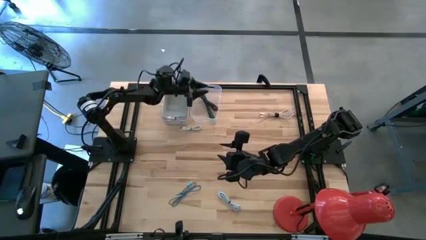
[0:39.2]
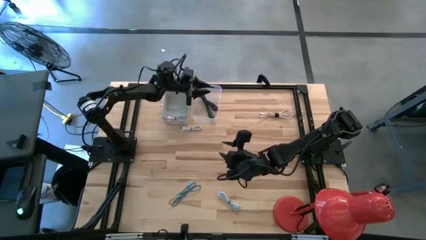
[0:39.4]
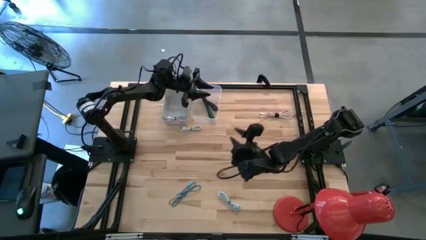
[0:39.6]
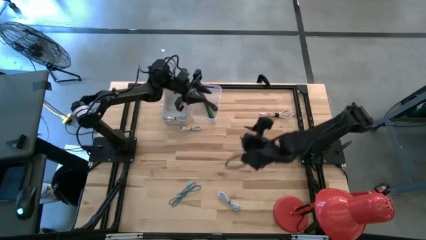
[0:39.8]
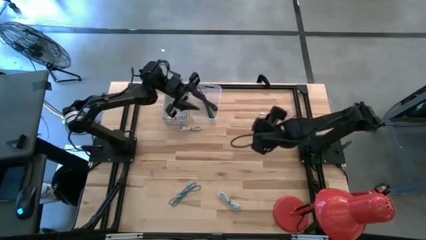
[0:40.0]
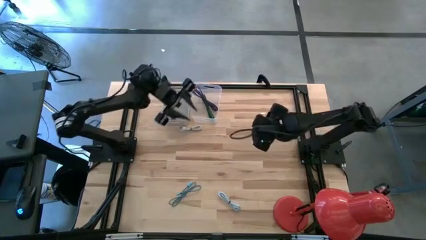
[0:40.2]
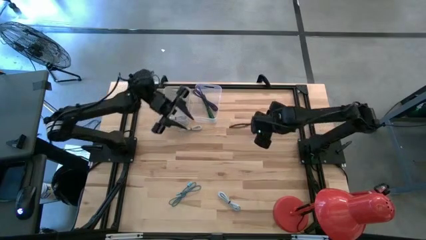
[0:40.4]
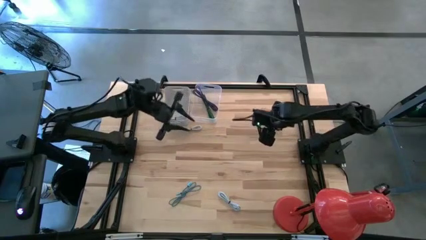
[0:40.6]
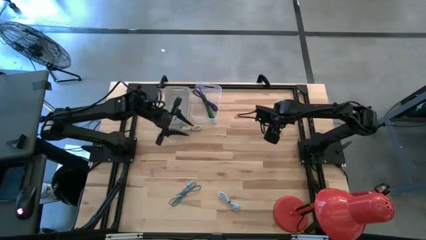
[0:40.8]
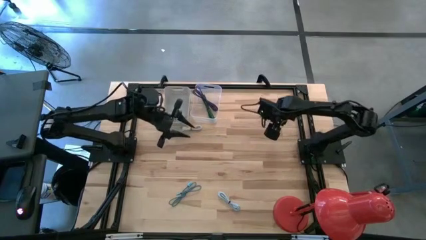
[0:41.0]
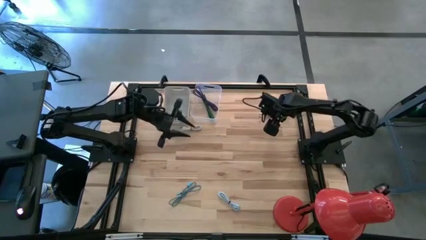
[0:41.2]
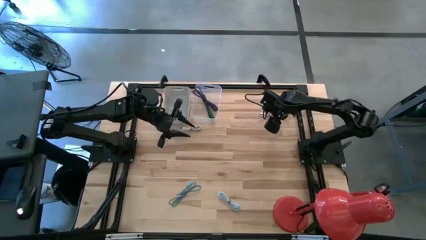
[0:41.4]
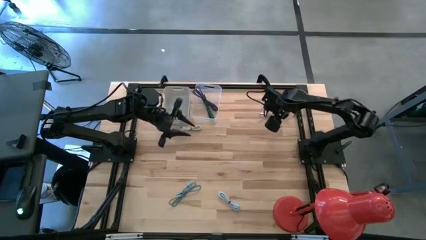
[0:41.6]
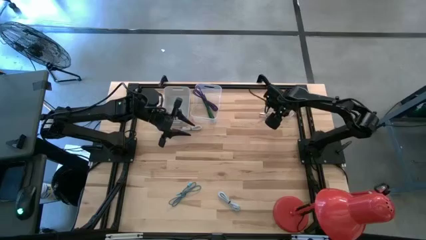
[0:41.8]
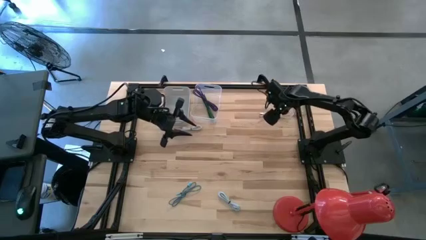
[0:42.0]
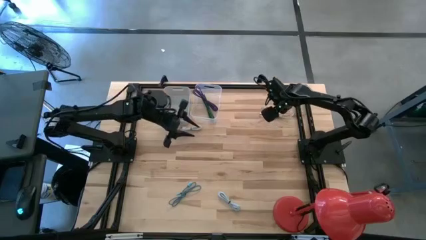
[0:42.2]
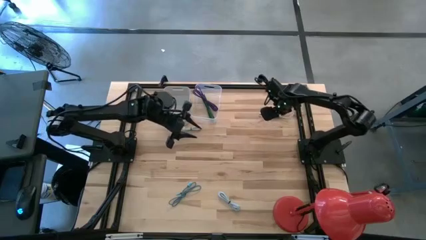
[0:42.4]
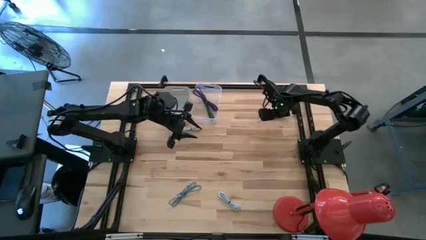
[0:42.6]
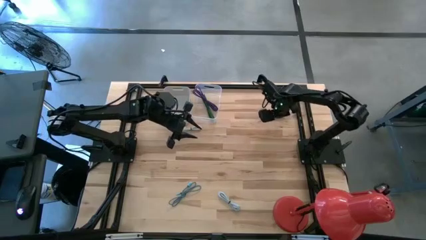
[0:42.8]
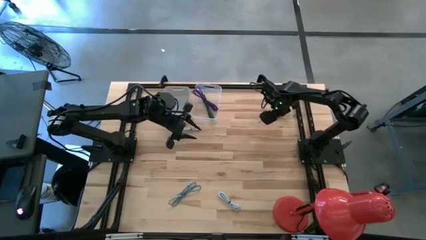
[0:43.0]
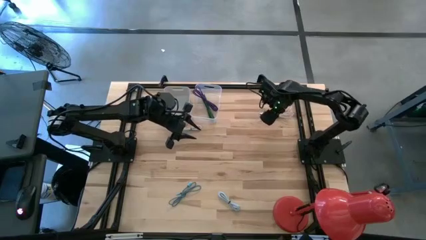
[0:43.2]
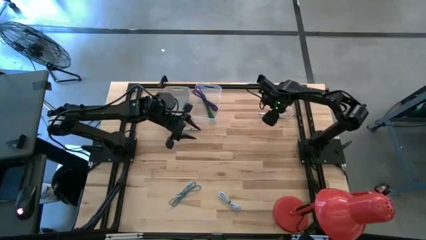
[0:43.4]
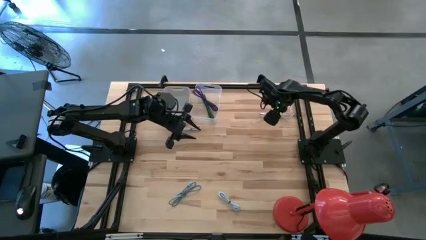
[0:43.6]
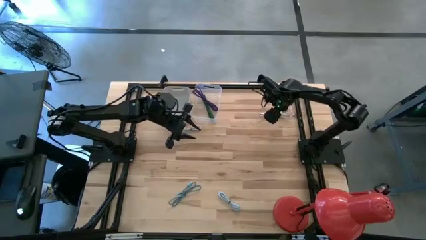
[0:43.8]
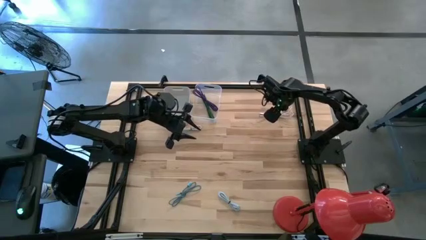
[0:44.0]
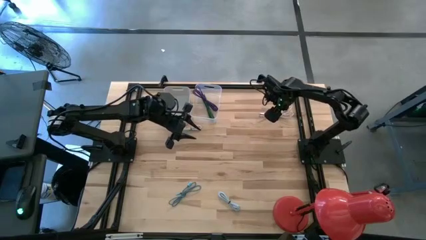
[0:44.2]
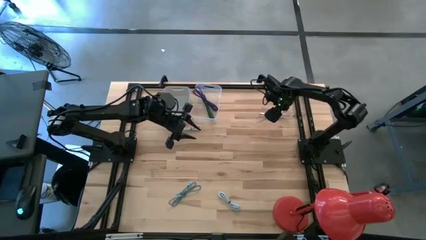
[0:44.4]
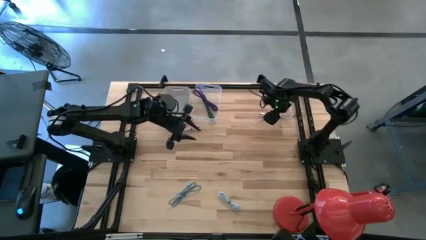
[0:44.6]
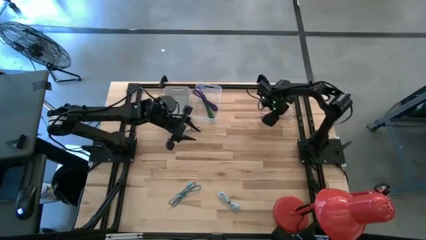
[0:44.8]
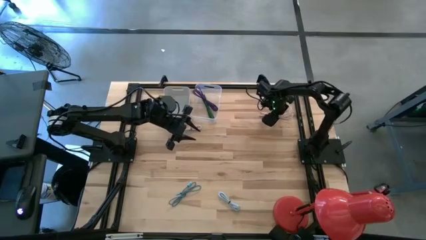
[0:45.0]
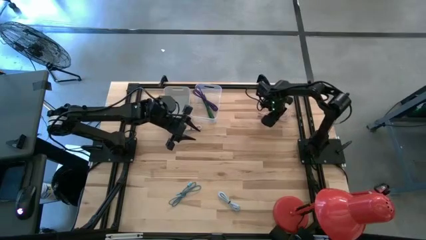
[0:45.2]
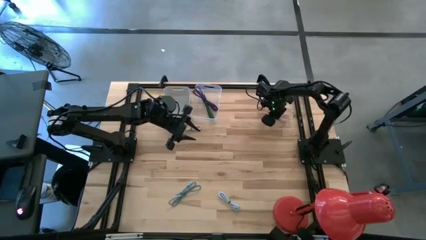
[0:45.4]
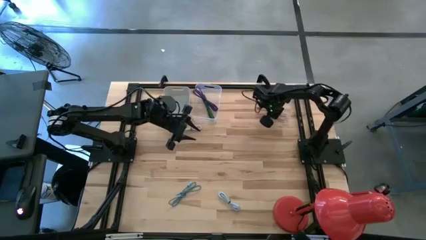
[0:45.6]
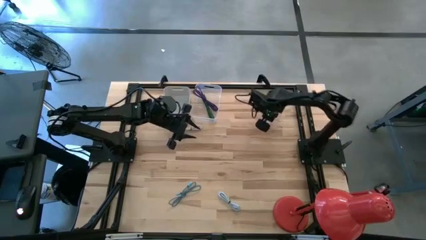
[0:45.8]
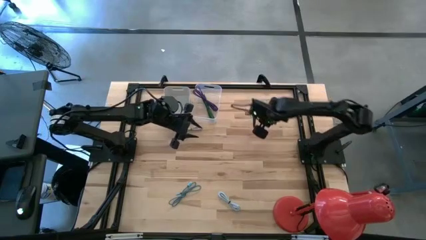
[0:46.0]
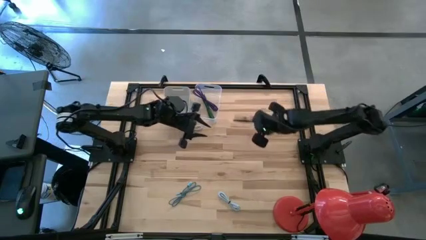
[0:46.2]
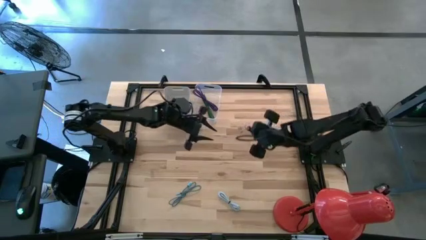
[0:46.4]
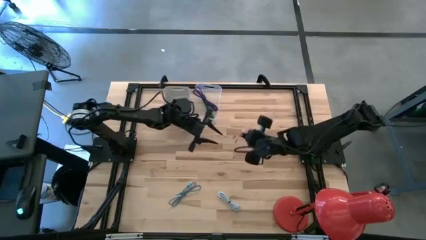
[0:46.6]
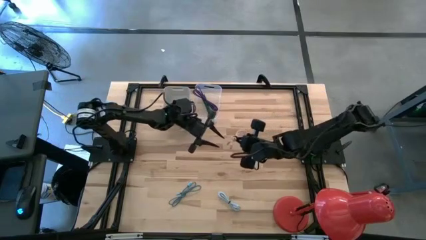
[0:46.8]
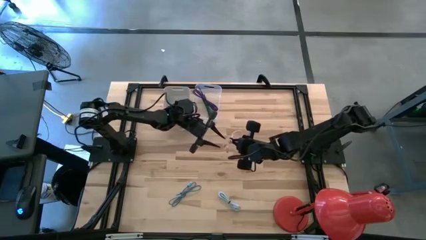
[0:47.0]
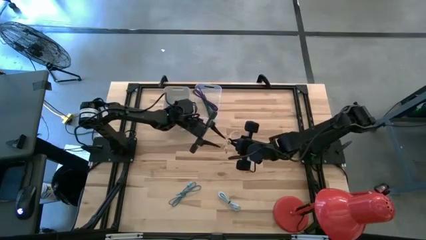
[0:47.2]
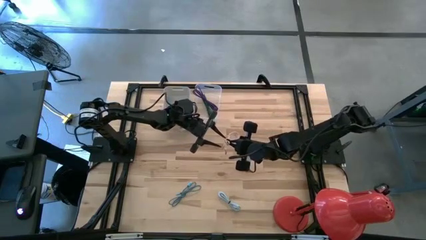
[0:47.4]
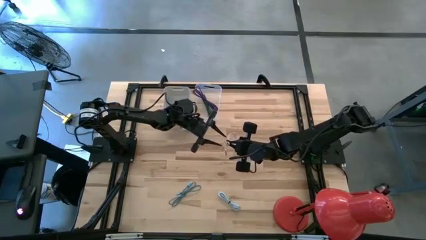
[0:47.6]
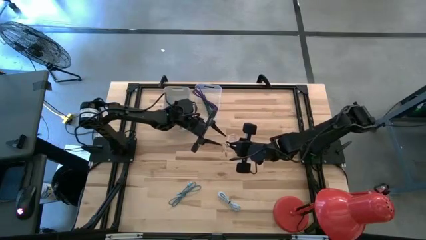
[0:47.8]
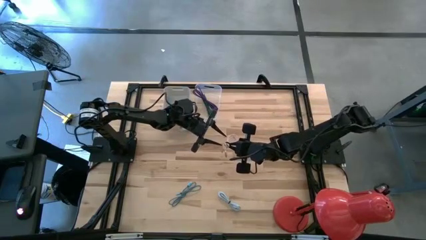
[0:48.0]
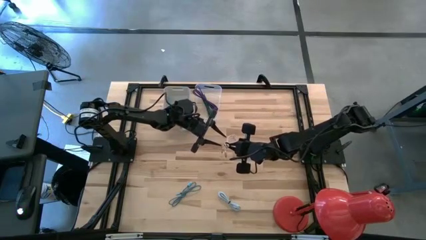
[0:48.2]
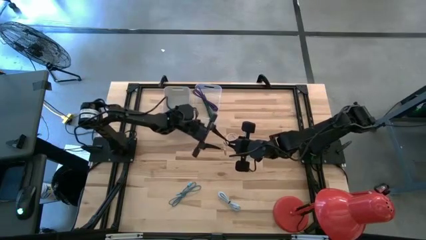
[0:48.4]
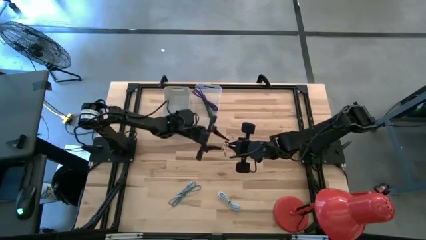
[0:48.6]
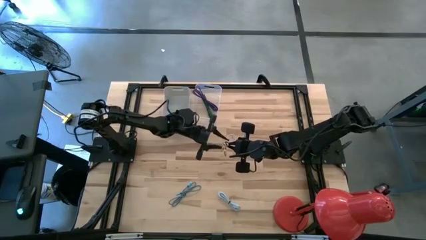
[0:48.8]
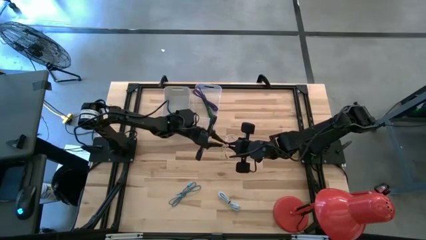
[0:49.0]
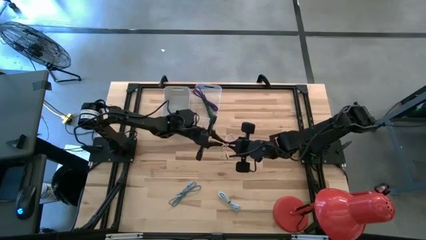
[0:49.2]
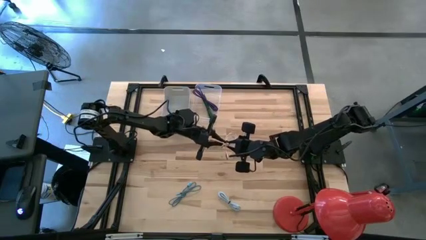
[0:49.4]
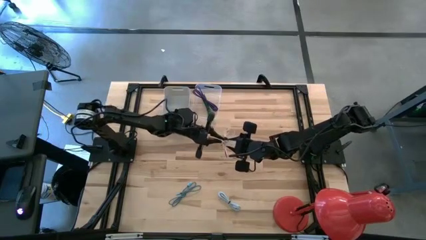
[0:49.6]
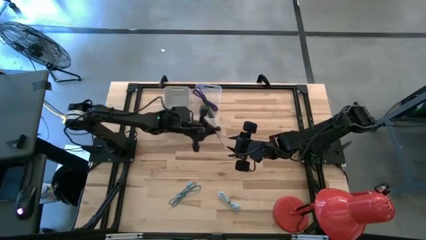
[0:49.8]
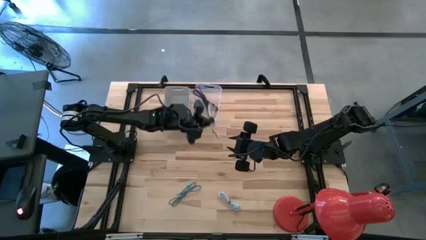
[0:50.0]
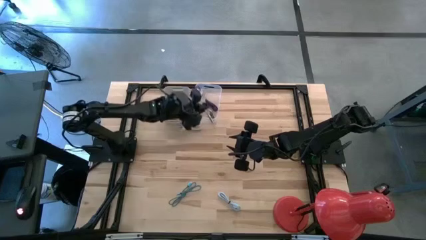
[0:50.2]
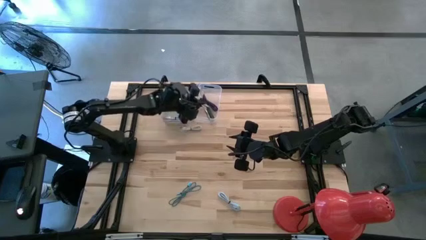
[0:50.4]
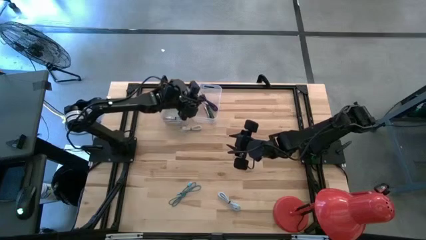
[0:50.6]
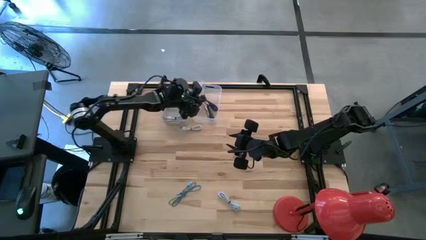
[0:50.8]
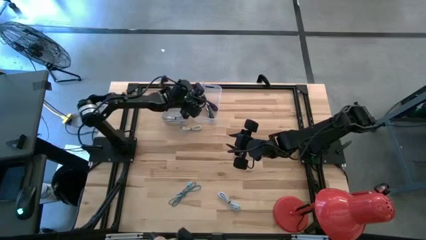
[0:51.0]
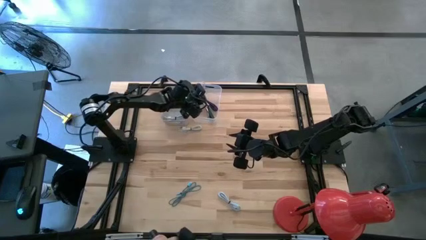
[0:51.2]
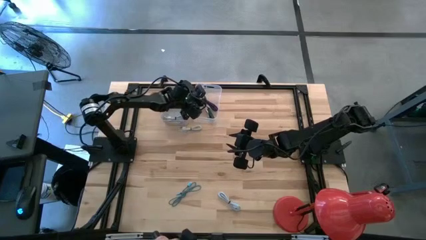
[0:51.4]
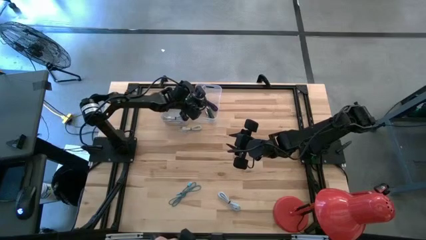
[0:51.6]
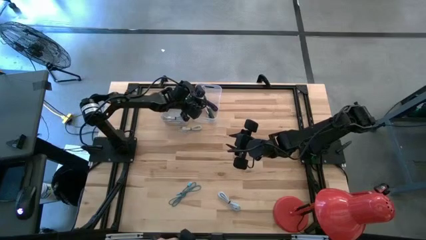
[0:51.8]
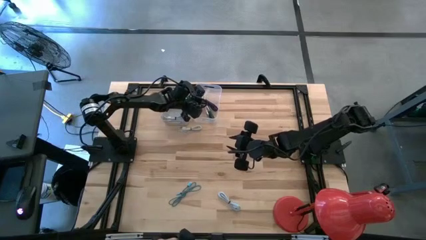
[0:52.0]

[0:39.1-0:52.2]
Task: Pick & Place USB Port
Put the striped pink charger cable into the transparent bin

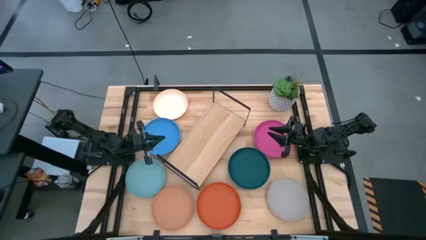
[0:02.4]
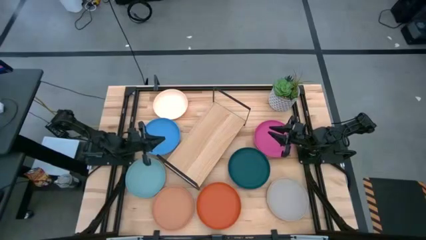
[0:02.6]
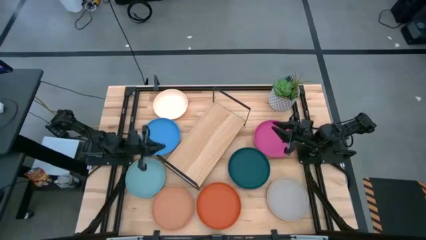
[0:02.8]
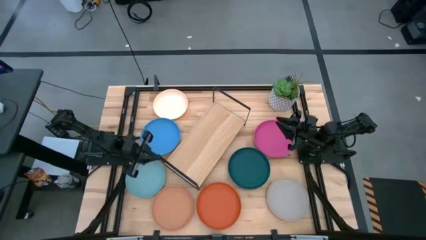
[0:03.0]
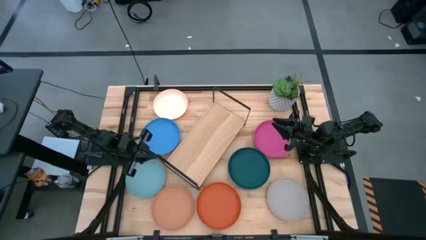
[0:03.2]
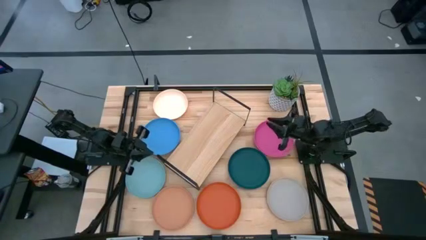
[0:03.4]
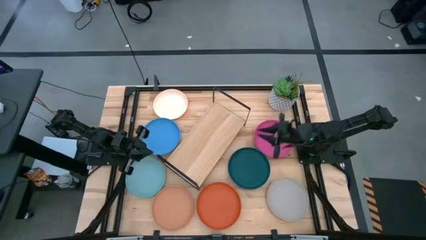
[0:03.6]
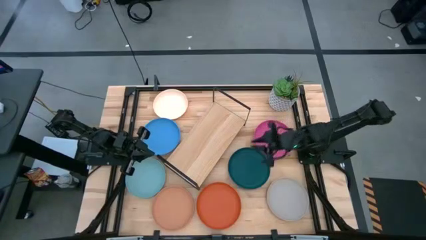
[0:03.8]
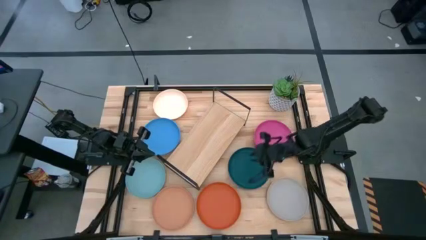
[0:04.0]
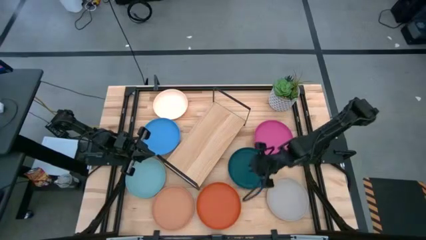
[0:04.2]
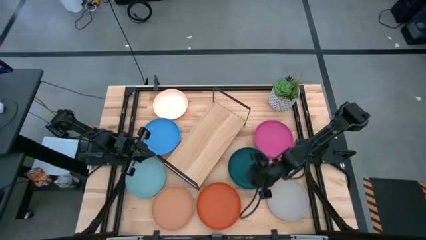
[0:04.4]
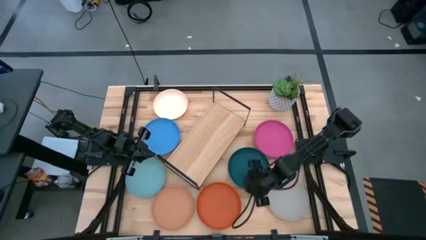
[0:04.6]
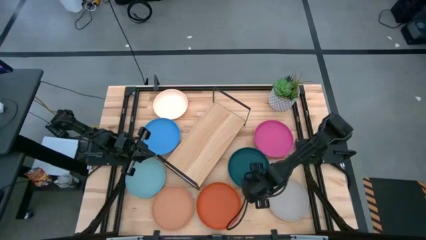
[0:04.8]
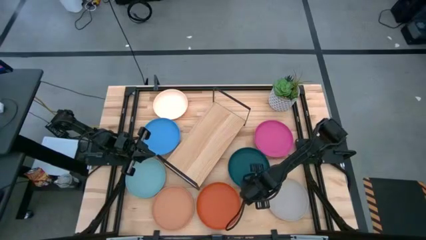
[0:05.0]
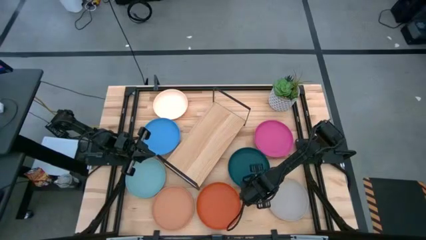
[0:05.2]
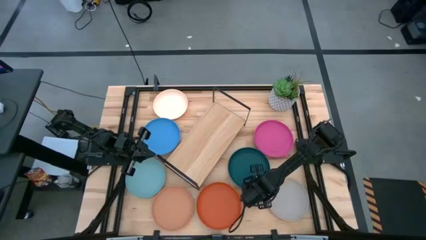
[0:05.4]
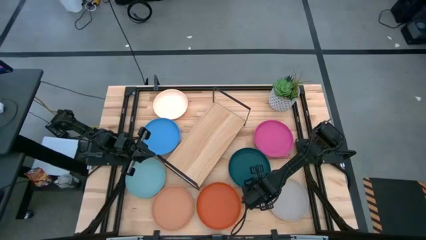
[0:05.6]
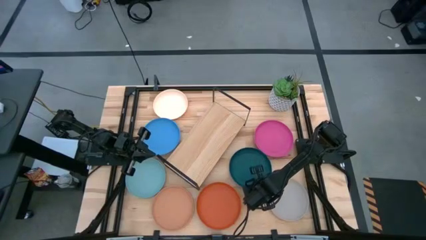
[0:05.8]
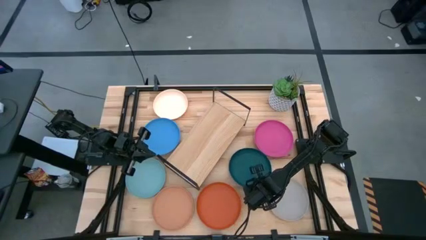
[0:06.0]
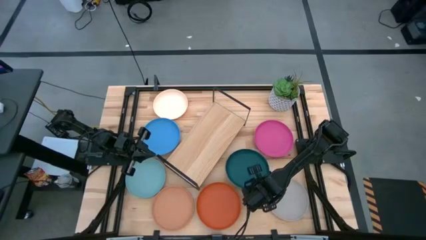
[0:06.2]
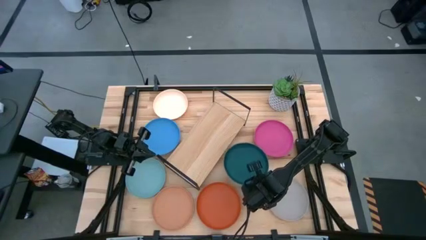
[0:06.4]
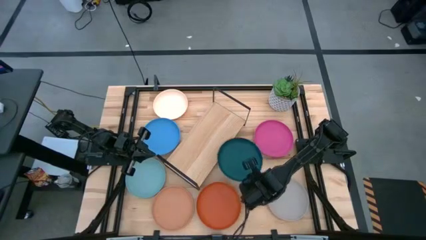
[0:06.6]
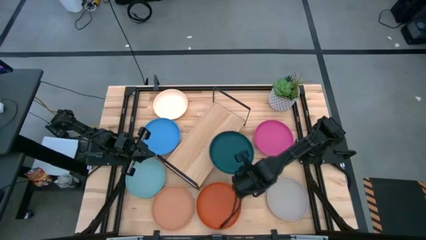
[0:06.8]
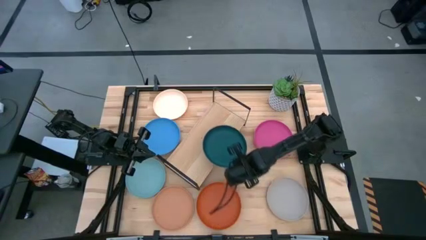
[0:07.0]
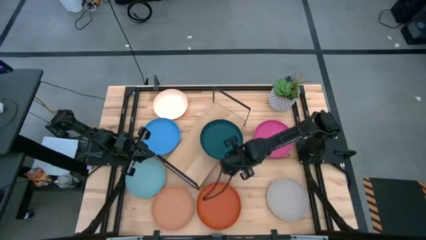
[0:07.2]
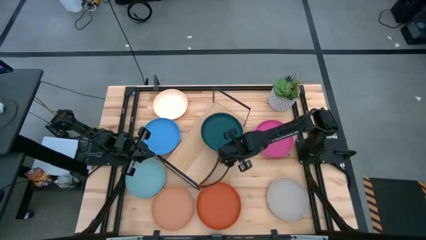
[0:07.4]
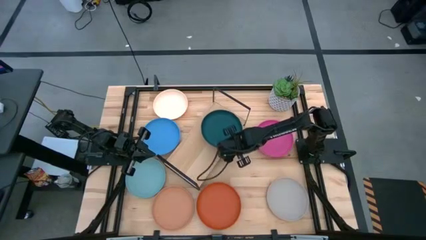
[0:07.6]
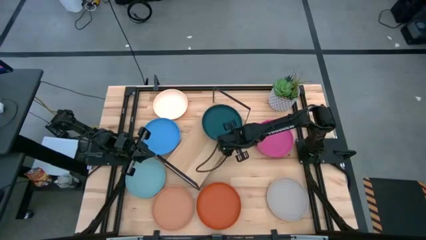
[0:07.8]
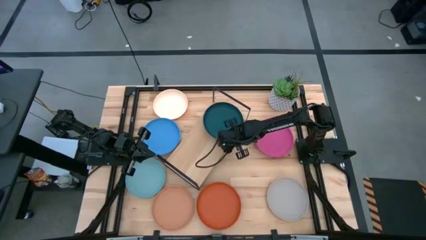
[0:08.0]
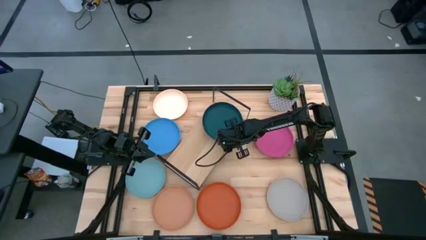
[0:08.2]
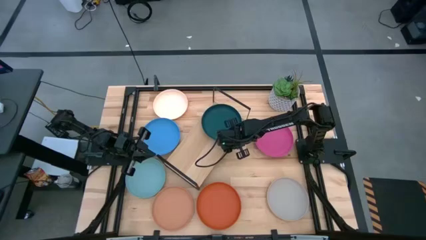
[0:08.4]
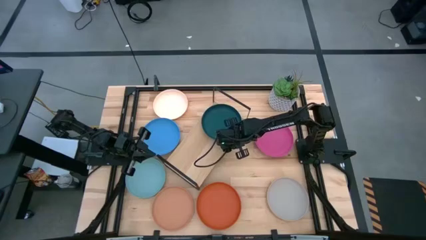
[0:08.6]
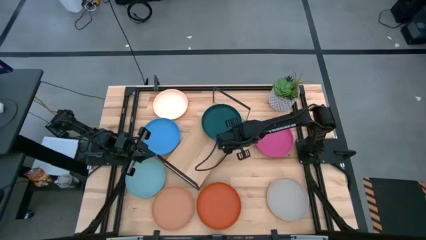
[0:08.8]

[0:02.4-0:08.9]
Task: Place and stack plates onto a shelf
Put the dark blue plate on the shelf
